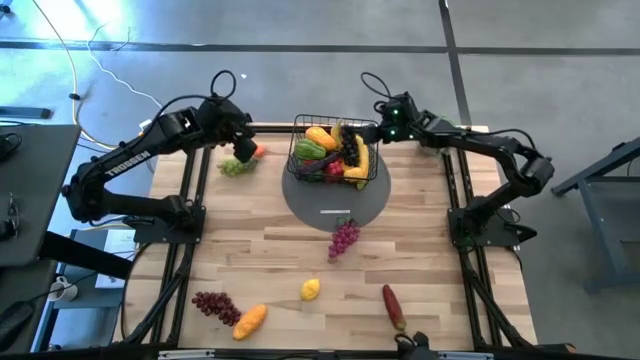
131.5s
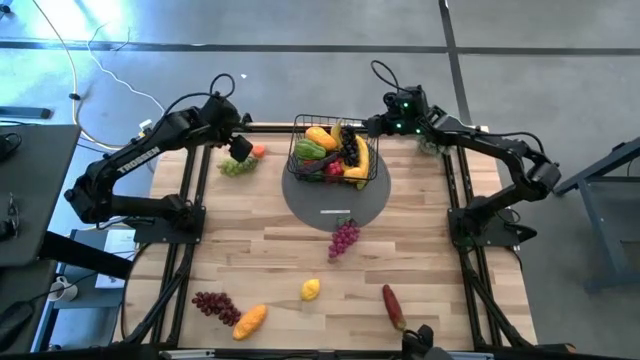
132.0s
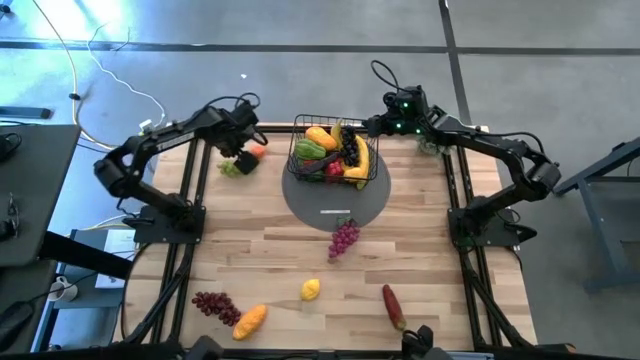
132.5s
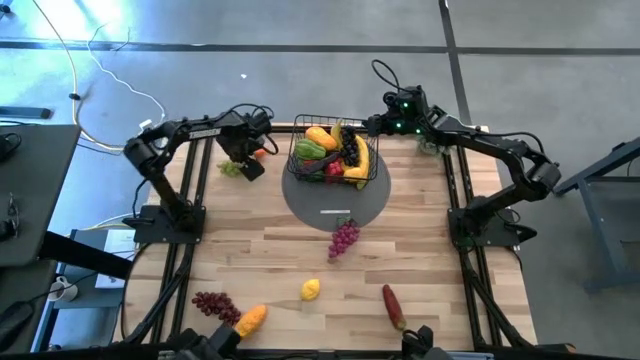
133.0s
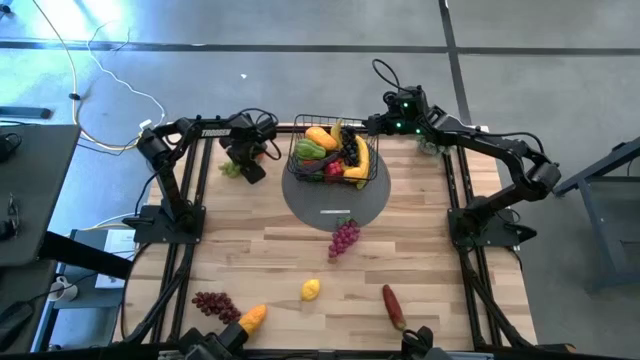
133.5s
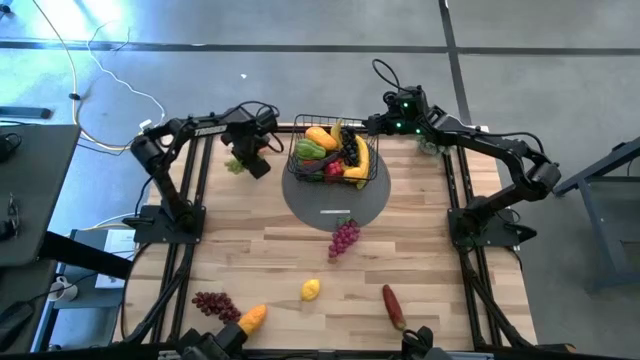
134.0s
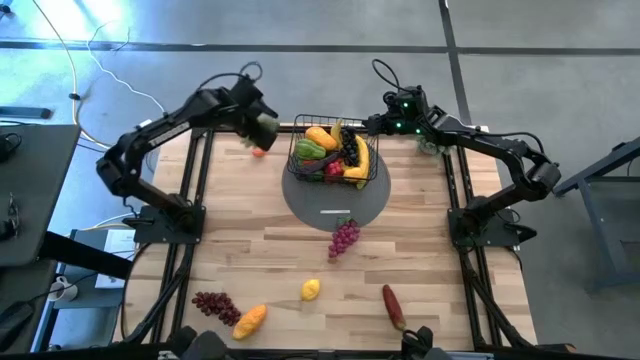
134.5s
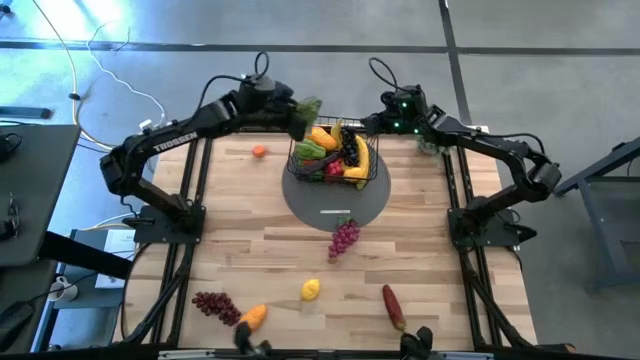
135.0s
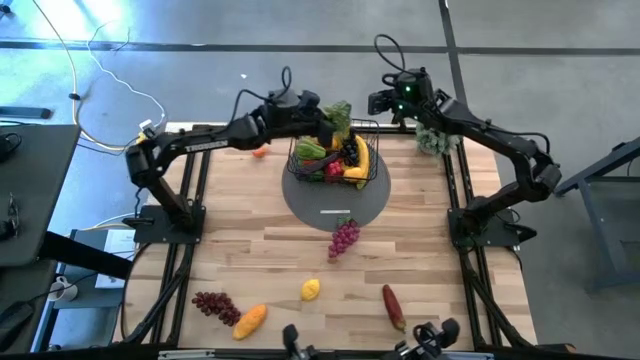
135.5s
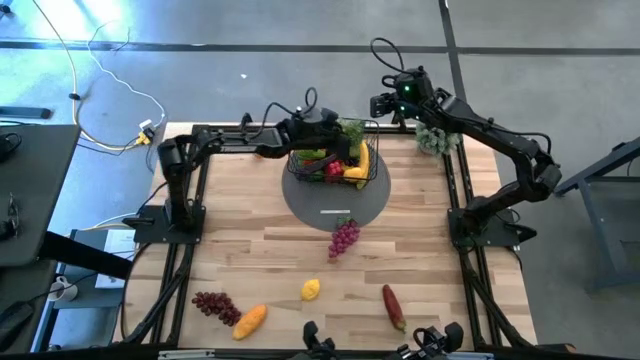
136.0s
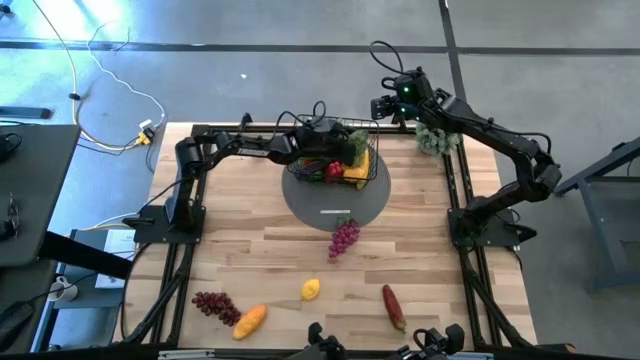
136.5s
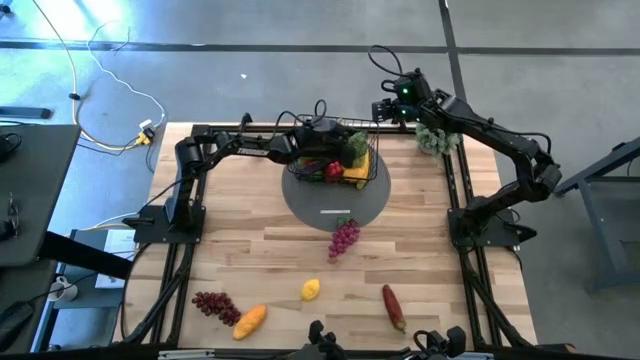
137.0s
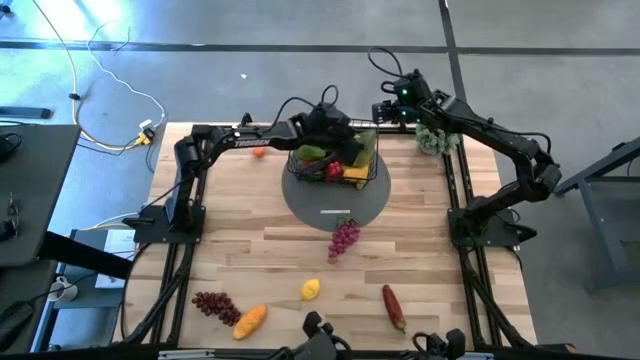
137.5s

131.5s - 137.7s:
Task: Build produce basket
Put the green grapes into the wire basket

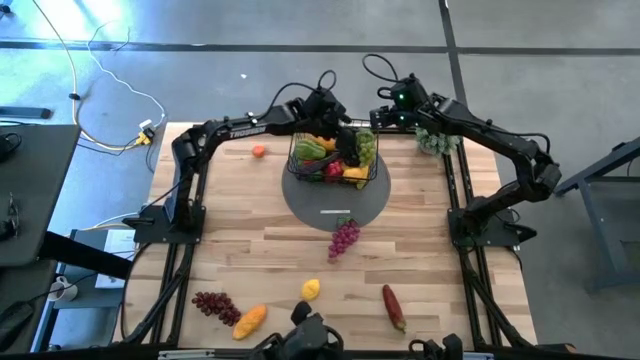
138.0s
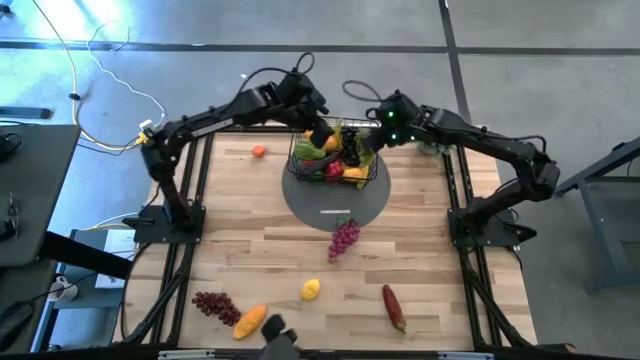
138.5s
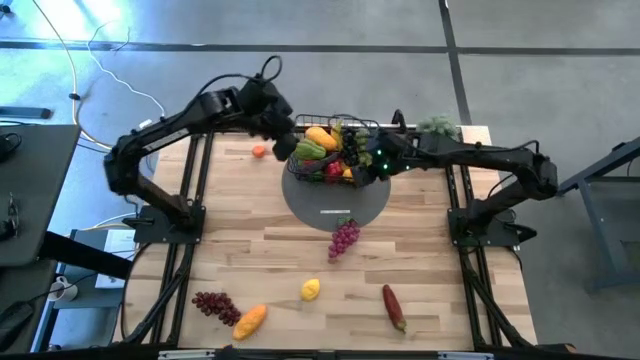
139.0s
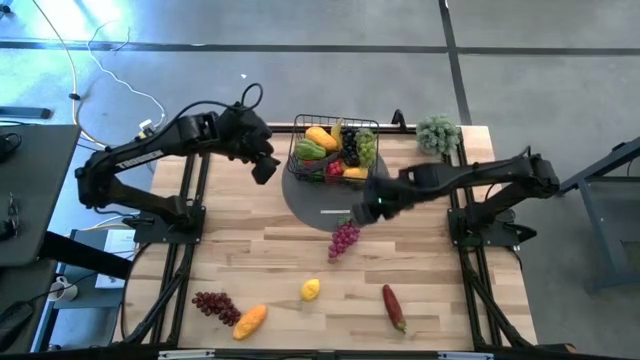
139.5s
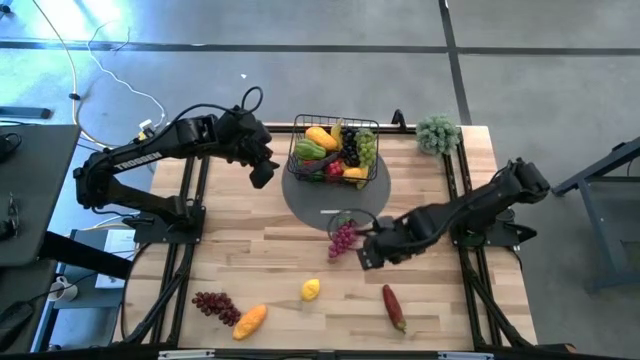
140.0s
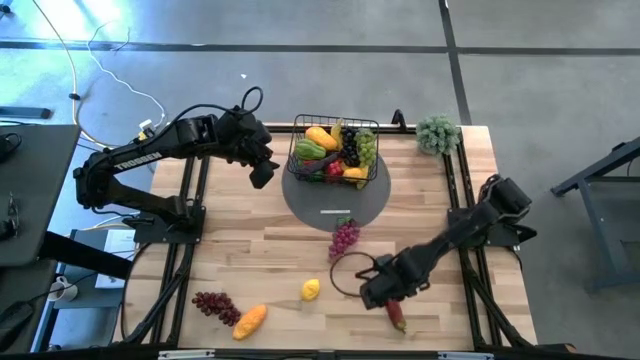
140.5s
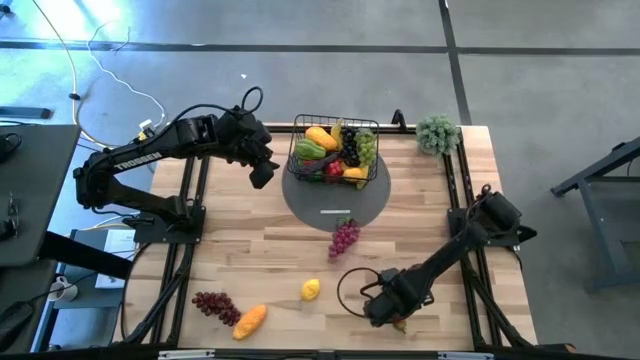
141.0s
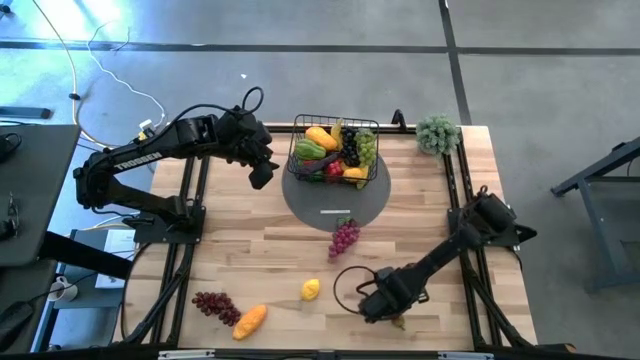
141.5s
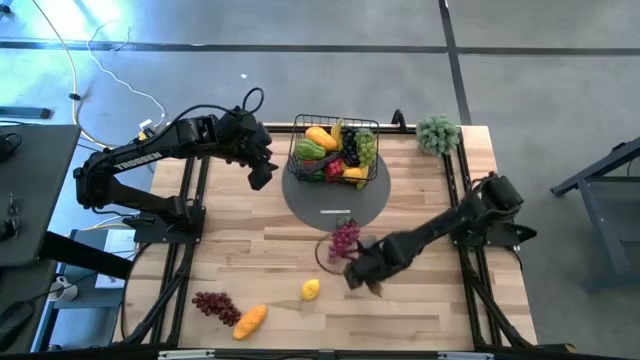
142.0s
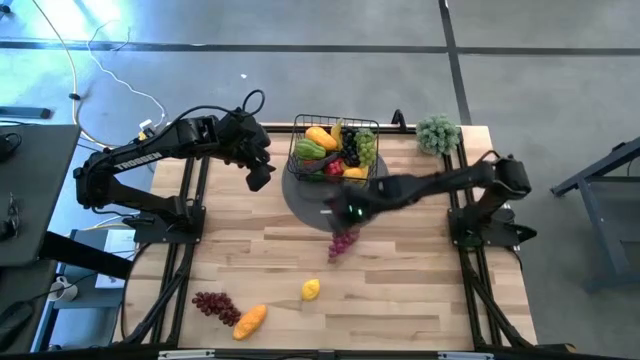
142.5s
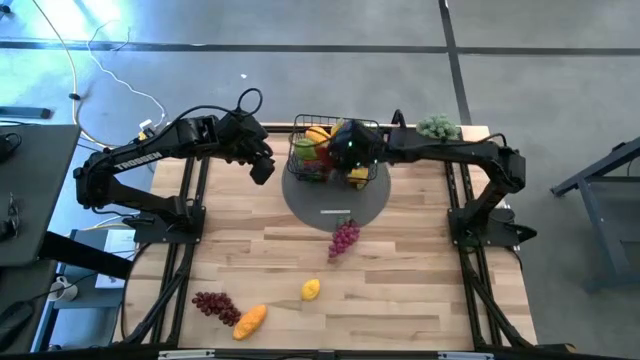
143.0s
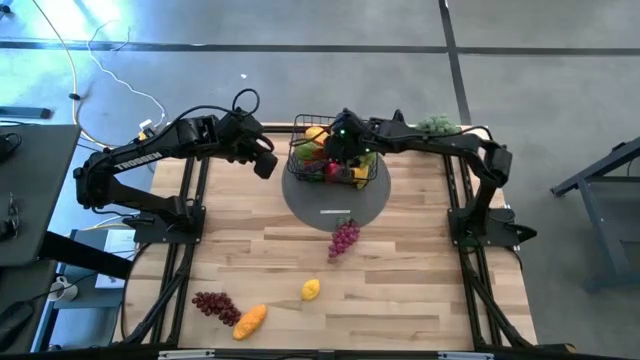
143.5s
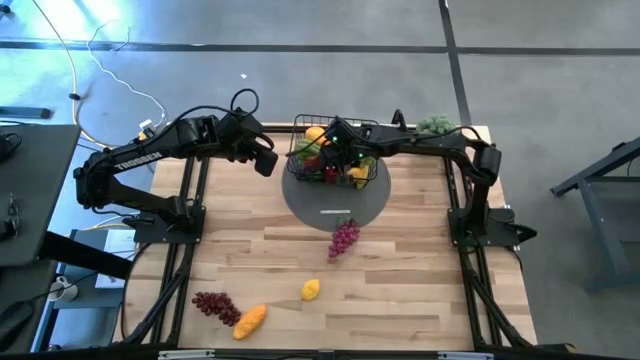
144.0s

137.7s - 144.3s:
Put the red chilli pepper into the wire basket

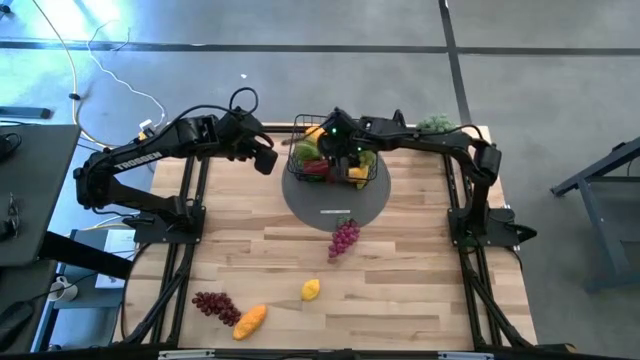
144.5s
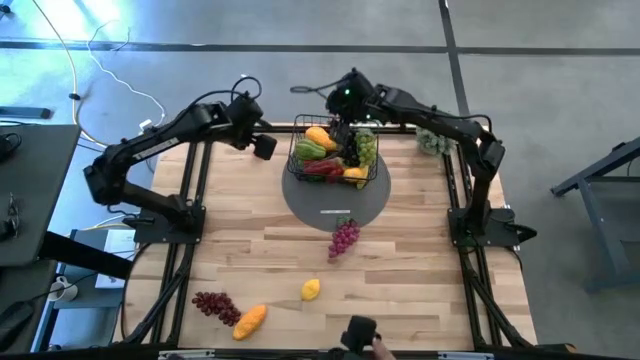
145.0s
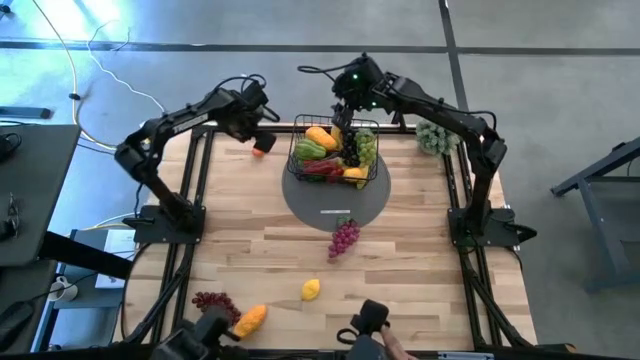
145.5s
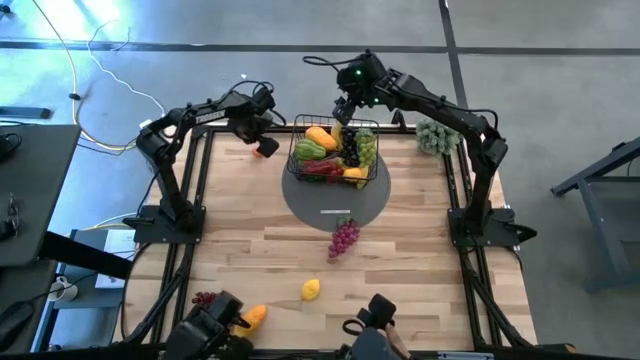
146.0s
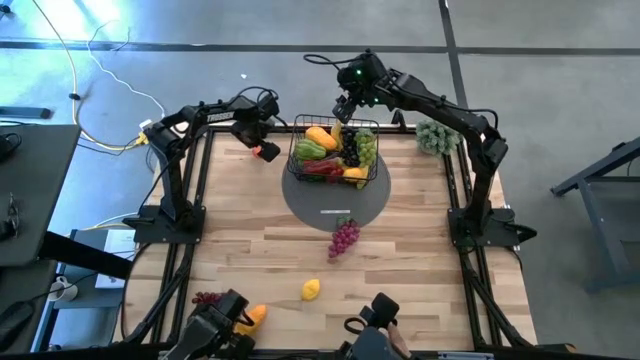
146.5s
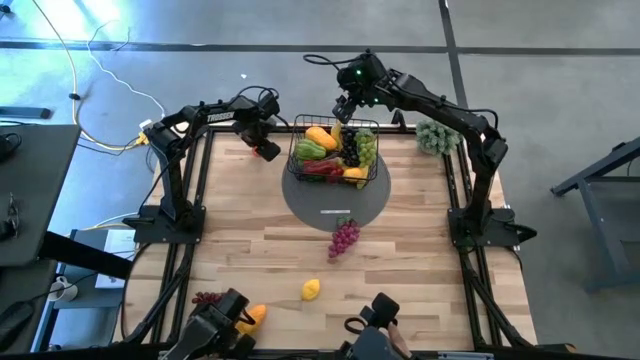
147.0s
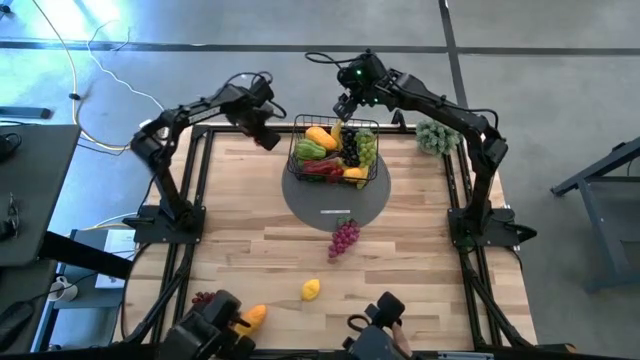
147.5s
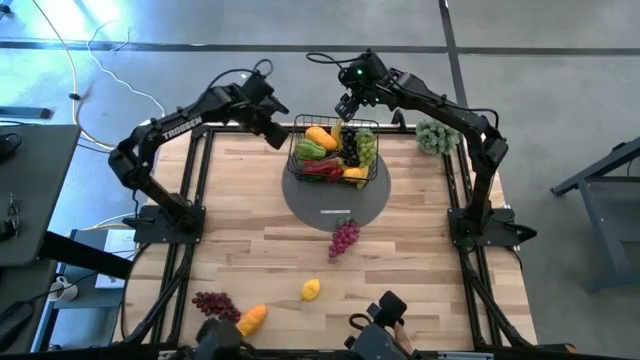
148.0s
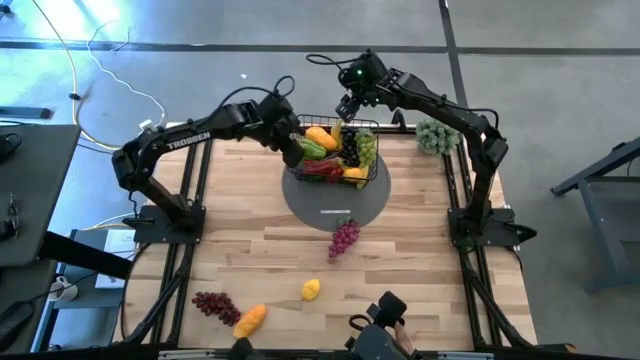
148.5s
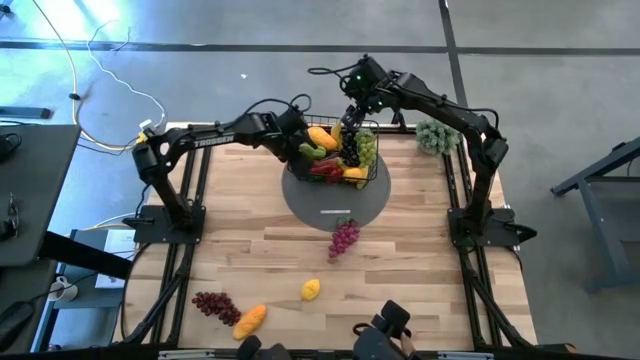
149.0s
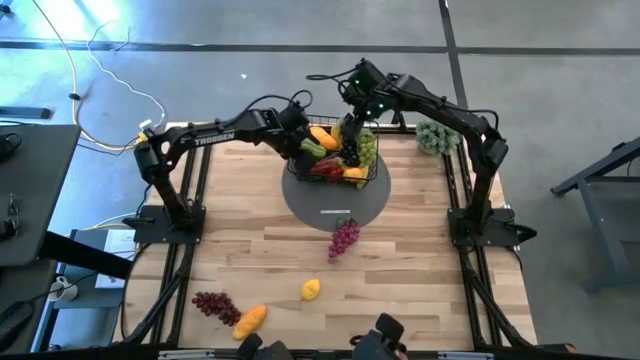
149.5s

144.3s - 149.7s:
Put the orange into the wire basket

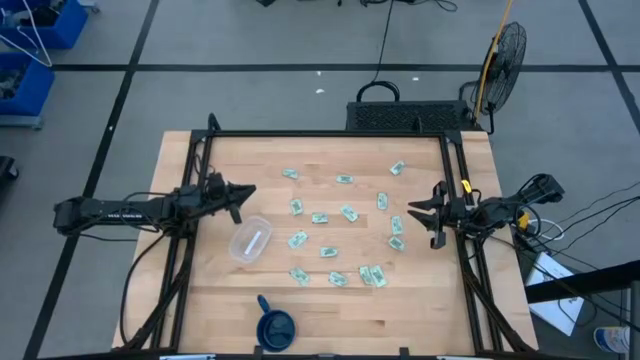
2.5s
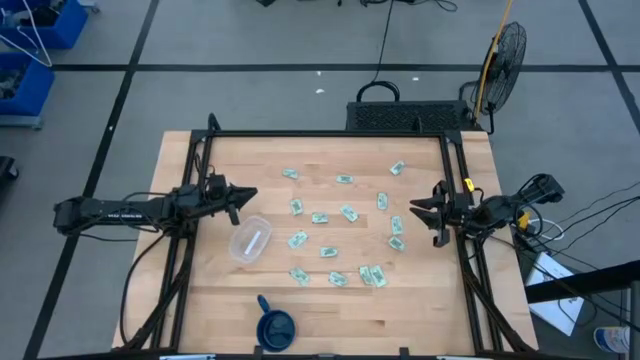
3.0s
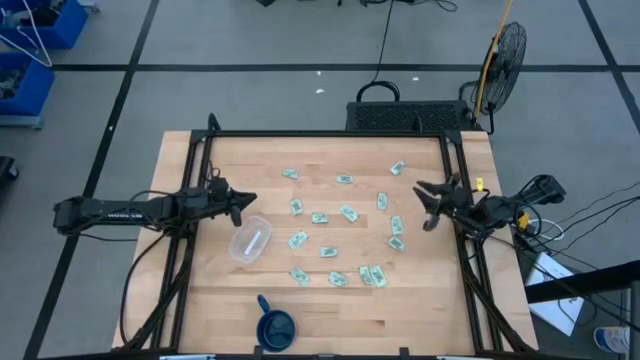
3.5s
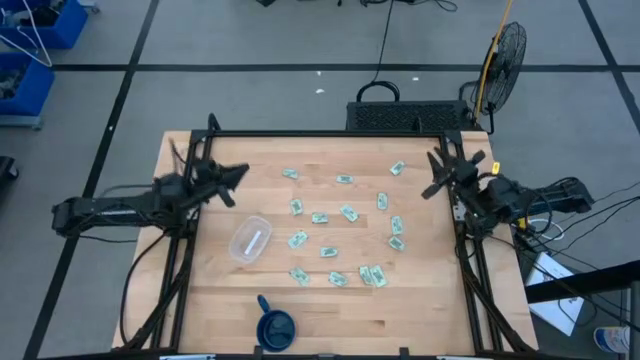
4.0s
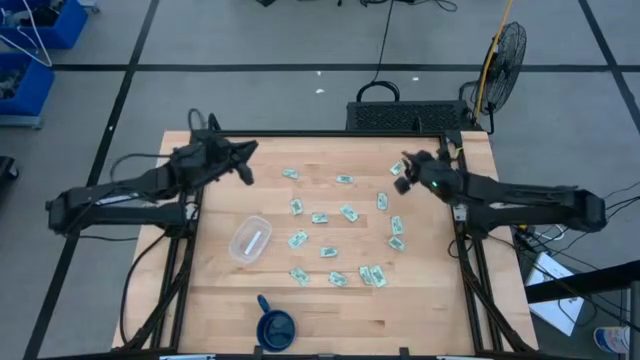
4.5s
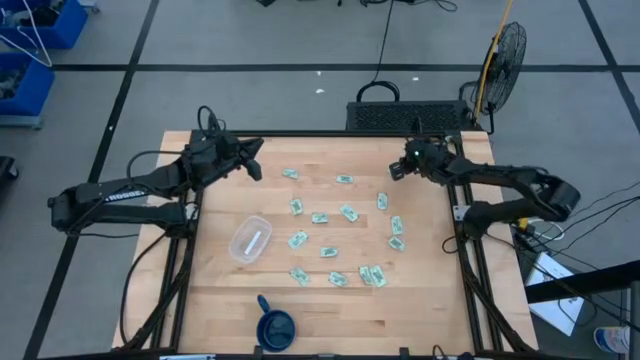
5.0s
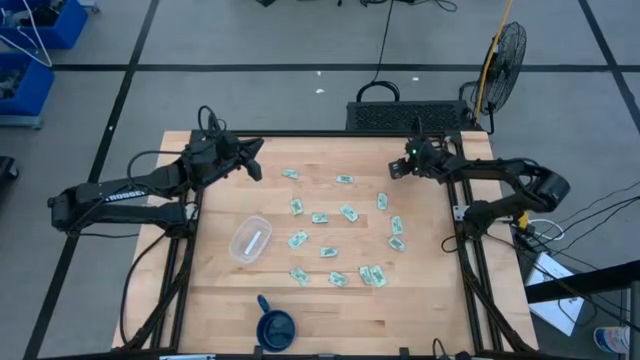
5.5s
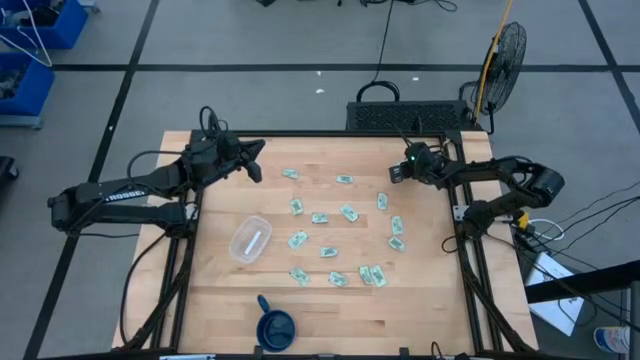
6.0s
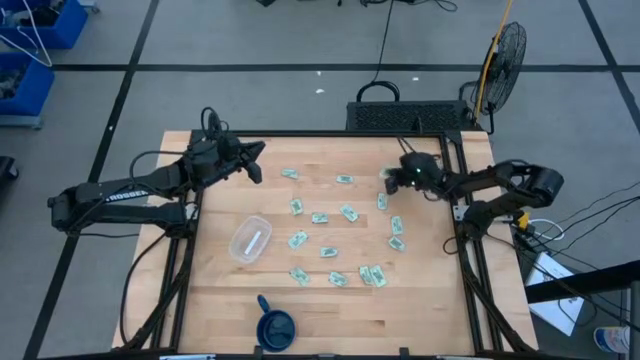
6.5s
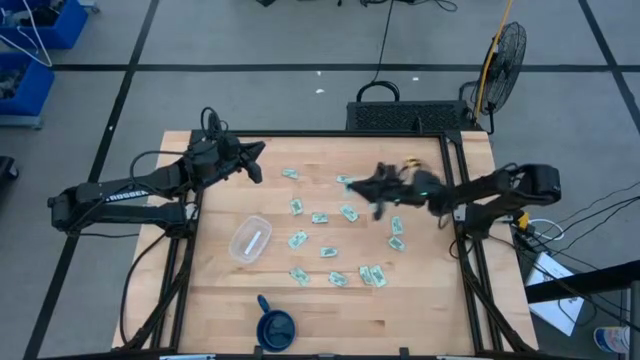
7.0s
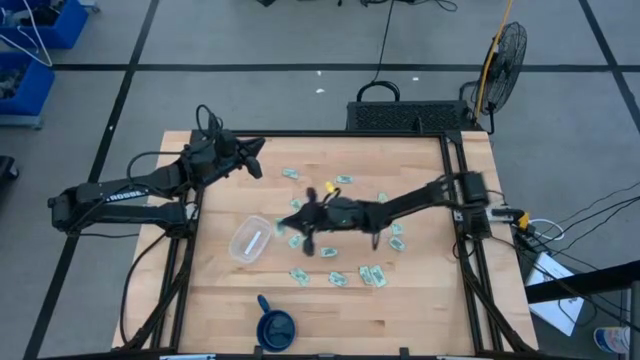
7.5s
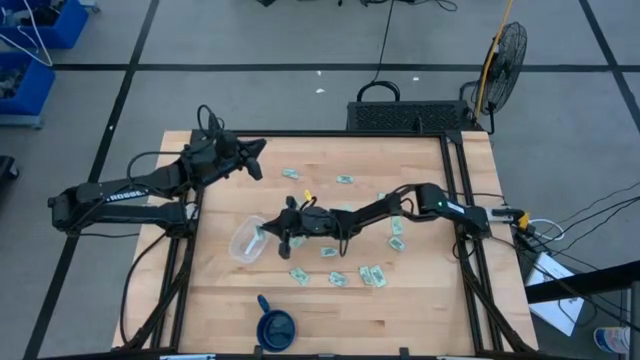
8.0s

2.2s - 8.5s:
Task: Pick and place Stevia / Truvia into bins
Put the stevia packet into the transparent container
